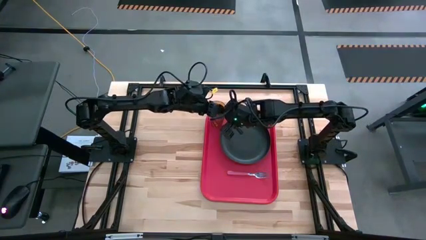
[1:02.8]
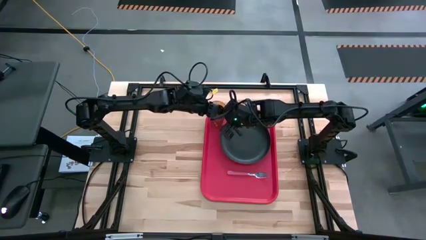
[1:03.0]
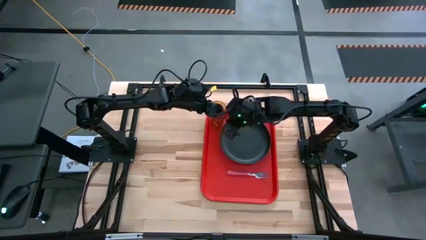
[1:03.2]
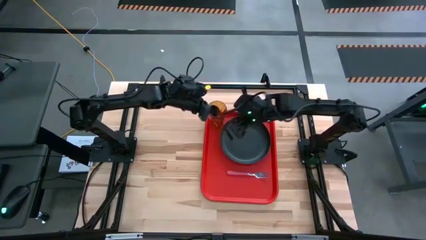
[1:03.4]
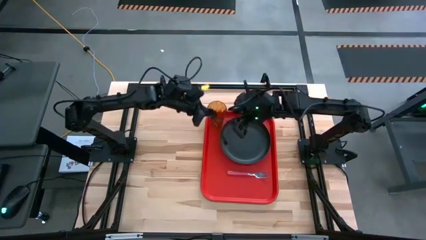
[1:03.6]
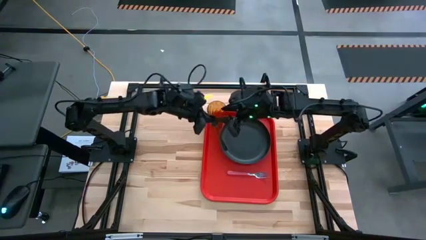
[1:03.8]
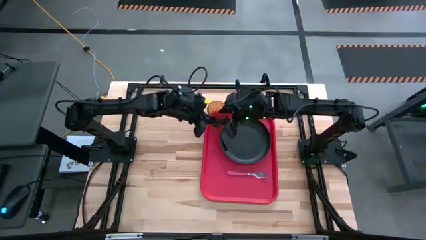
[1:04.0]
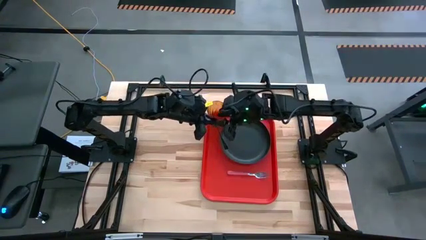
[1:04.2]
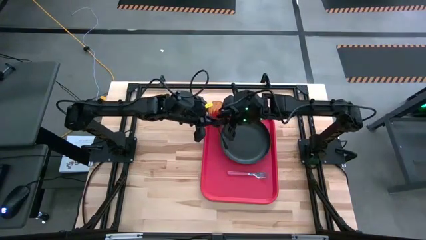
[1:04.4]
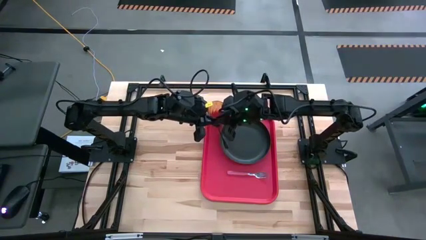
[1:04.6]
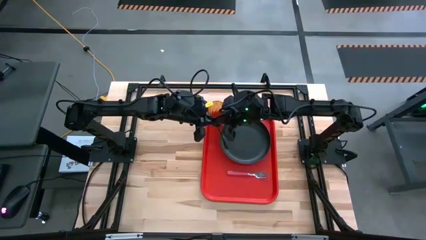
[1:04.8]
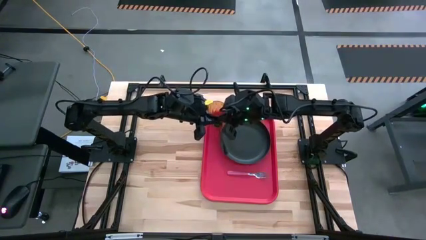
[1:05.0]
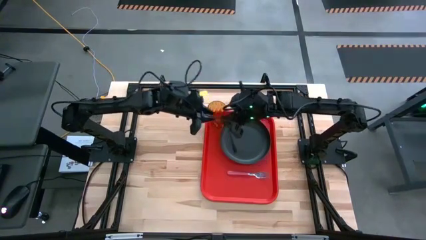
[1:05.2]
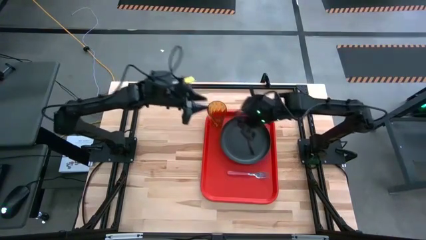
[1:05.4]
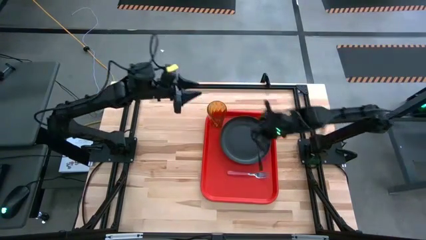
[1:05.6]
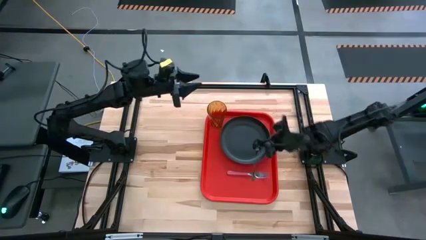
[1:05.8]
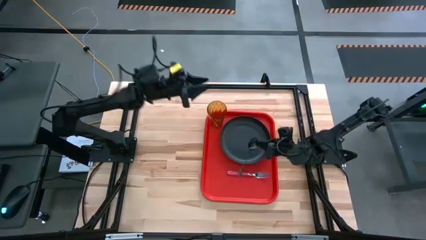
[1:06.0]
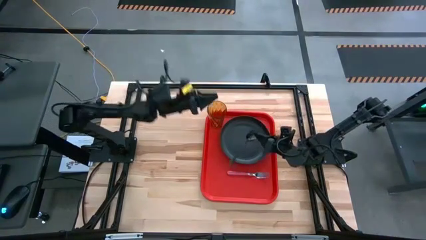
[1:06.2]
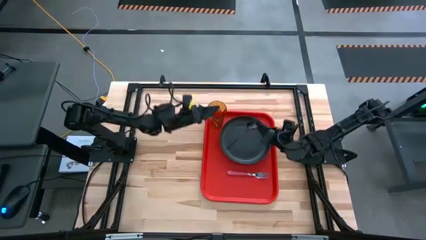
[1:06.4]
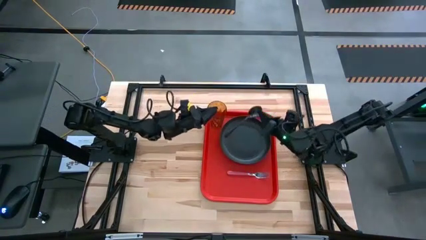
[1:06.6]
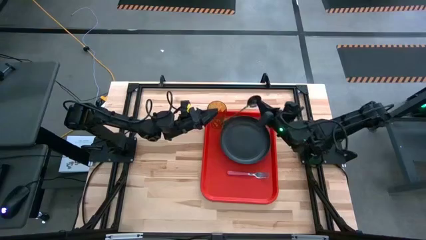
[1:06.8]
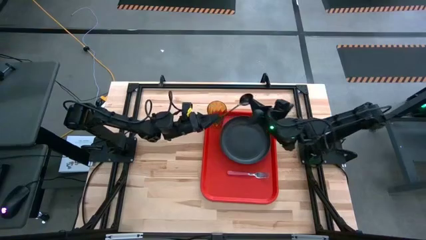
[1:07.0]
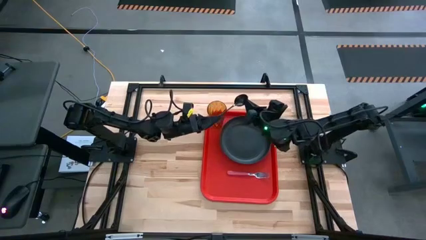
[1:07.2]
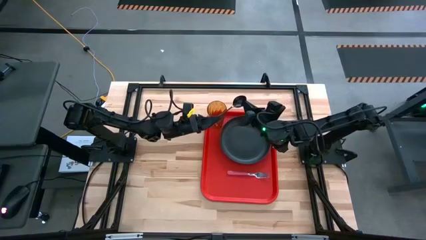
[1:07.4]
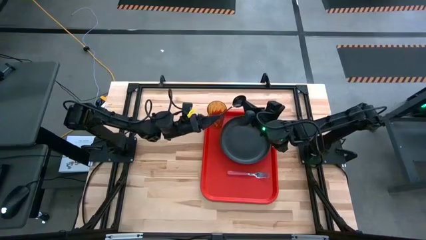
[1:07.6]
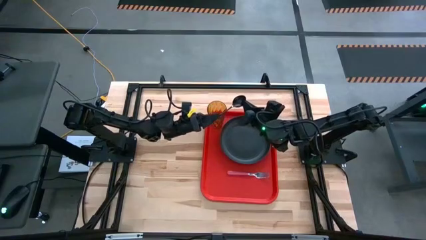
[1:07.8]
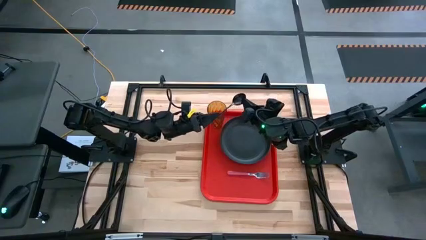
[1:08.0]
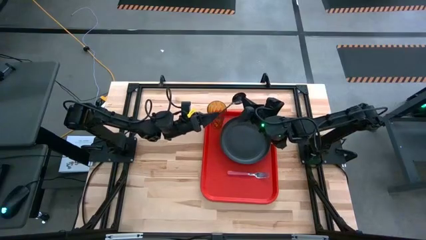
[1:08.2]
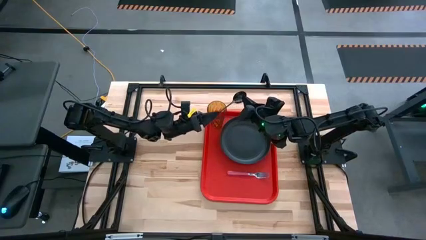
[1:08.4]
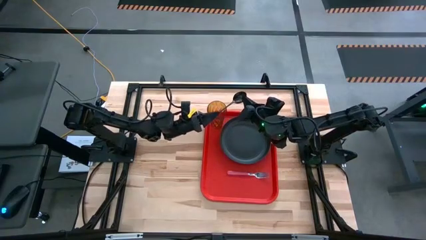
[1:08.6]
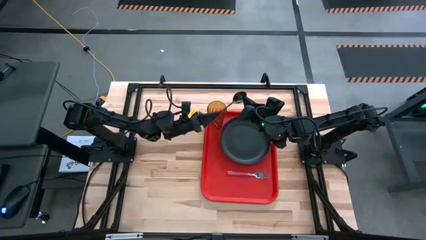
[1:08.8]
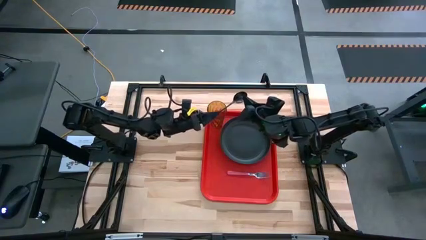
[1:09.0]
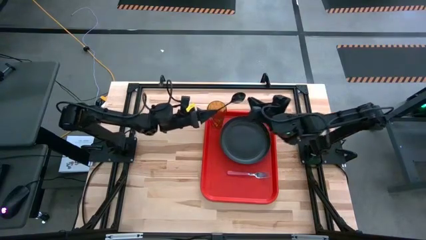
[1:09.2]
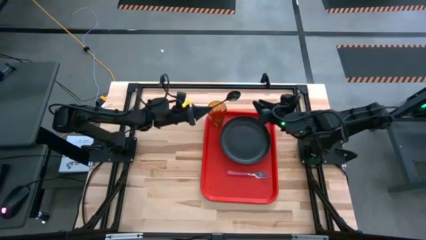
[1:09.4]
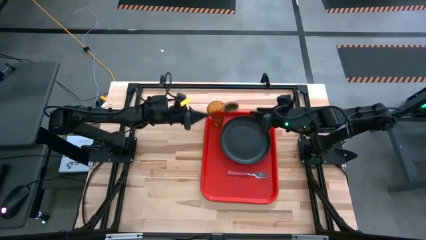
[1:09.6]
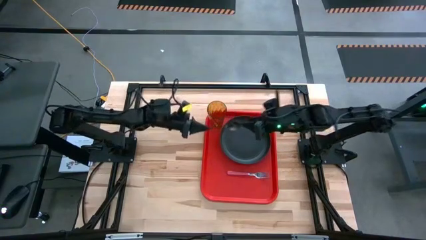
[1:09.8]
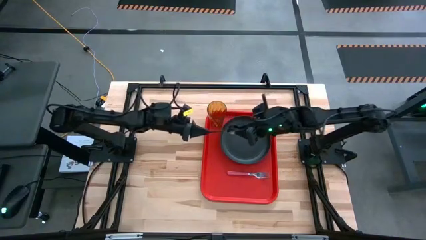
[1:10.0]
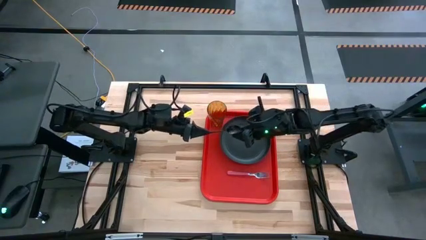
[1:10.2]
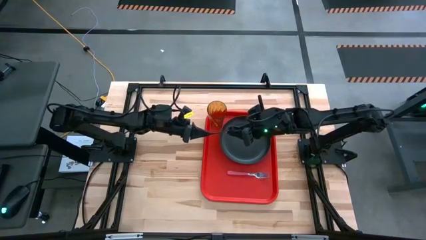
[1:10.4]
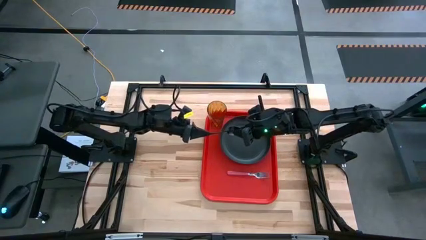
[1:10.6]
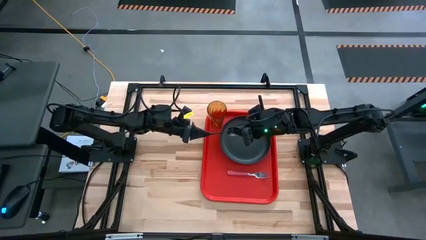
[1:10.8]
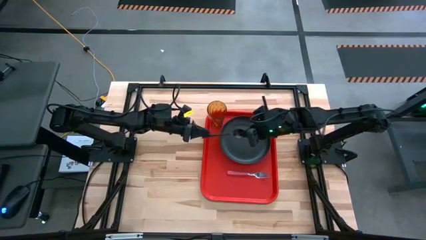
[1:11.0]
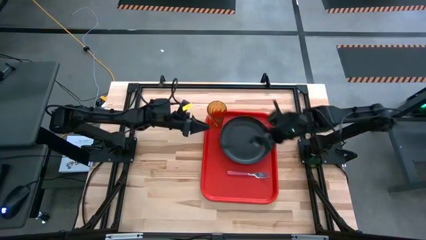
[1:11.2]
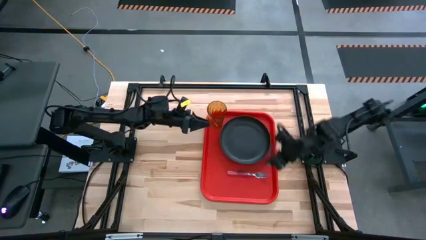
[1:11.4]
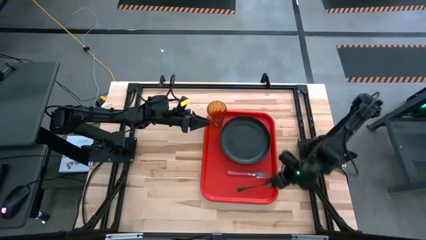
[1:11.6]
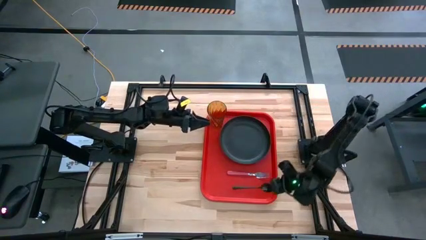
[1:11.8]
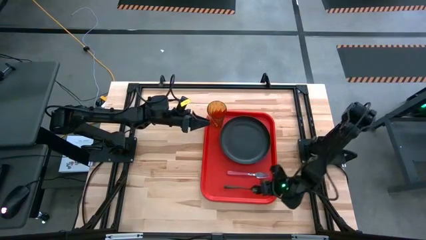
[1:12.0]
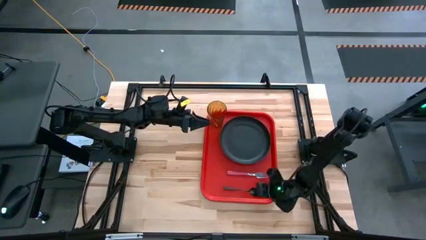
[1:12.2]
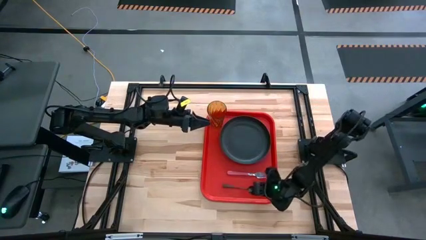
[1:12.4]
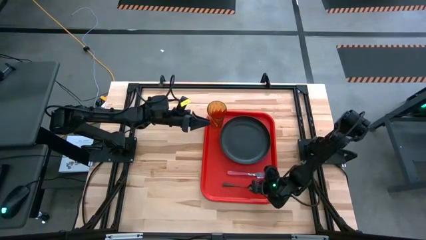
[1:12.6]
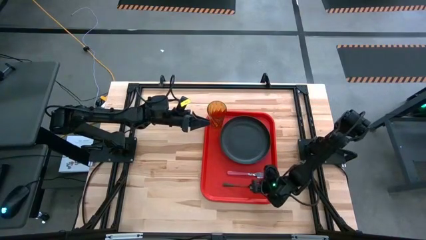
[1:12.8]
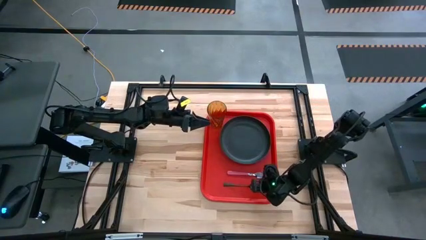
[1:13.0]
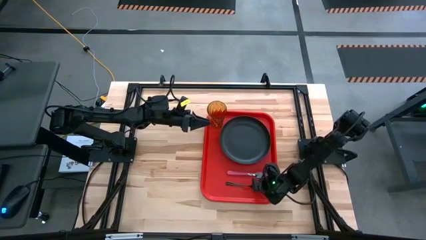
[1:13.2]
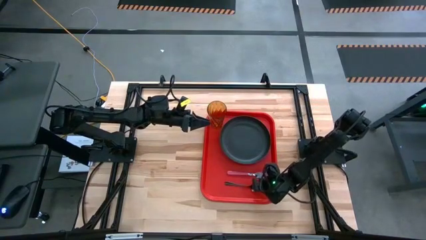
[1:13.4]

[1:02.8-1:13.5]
Task: Pick and place plate/cup/fork/spoon on tray
Put the black spoon on the red tray to the bottom of the pink fork

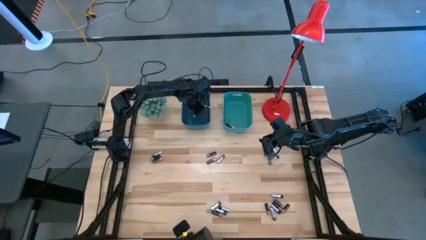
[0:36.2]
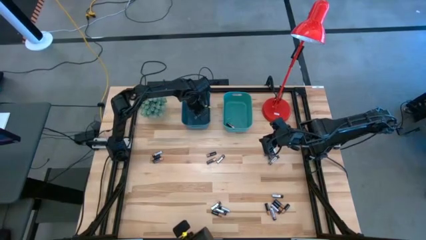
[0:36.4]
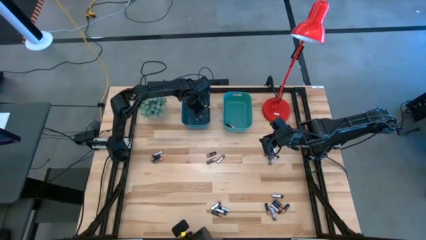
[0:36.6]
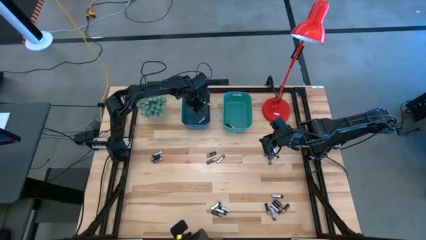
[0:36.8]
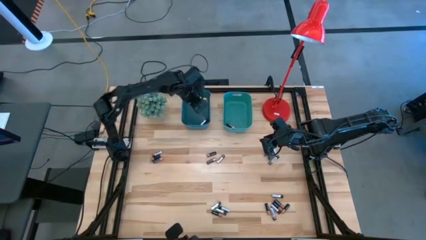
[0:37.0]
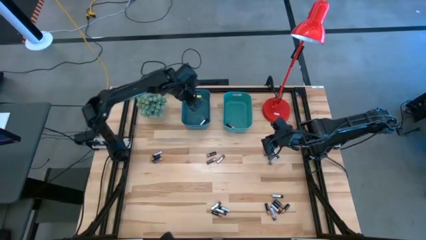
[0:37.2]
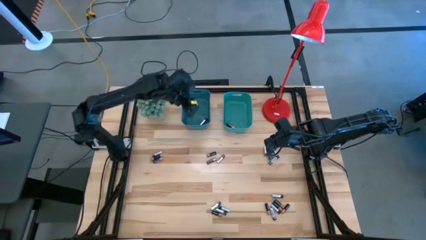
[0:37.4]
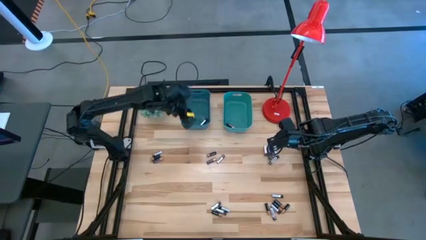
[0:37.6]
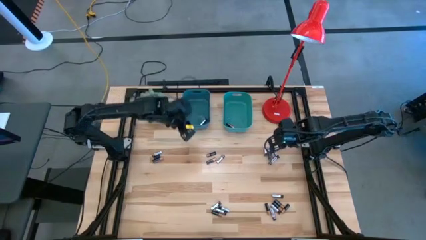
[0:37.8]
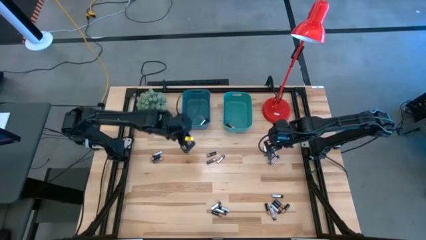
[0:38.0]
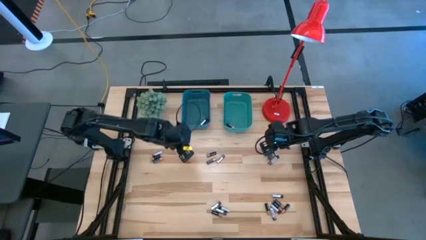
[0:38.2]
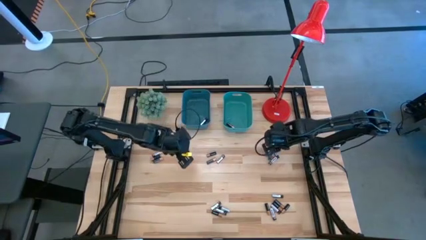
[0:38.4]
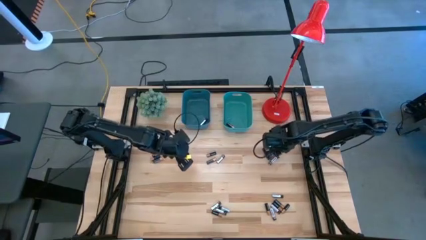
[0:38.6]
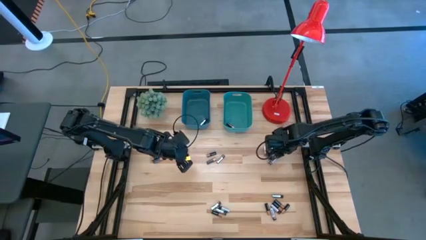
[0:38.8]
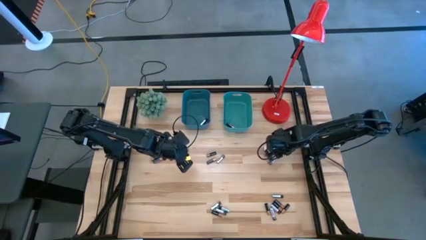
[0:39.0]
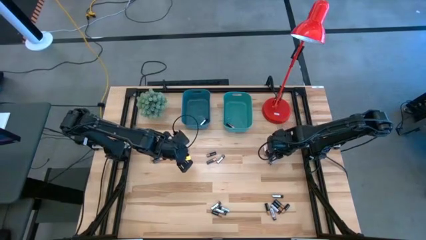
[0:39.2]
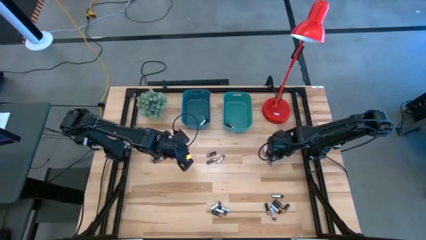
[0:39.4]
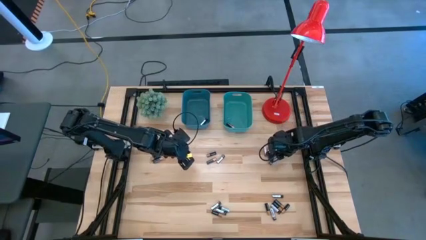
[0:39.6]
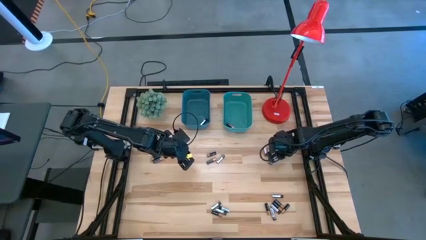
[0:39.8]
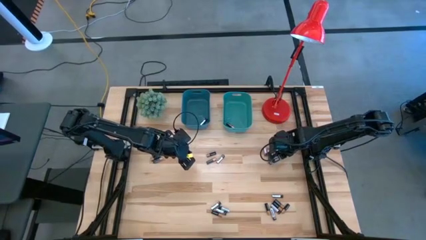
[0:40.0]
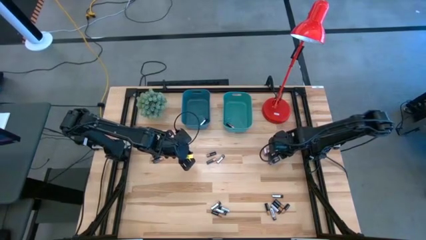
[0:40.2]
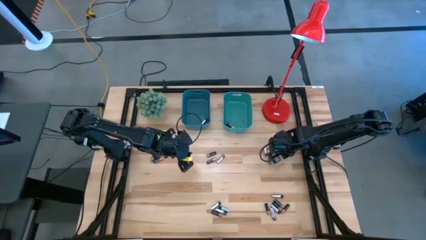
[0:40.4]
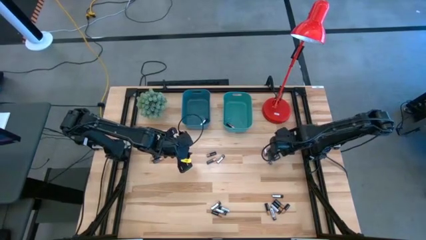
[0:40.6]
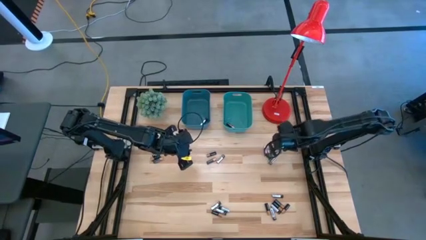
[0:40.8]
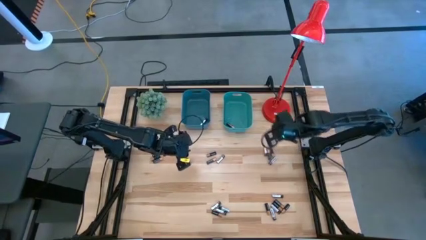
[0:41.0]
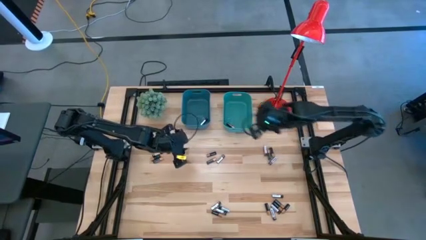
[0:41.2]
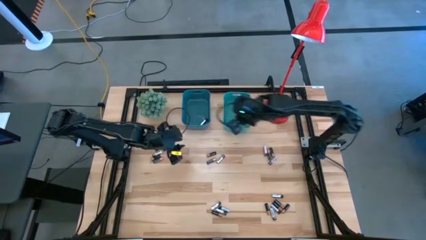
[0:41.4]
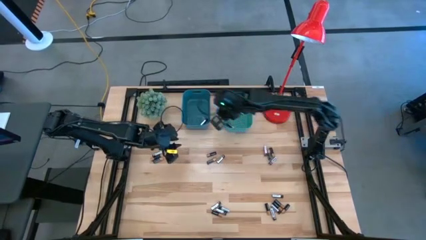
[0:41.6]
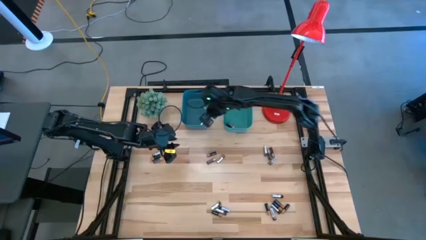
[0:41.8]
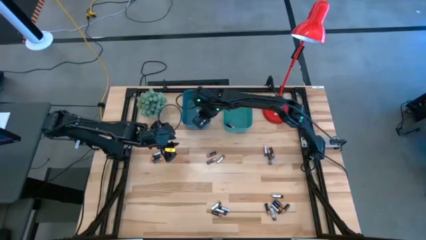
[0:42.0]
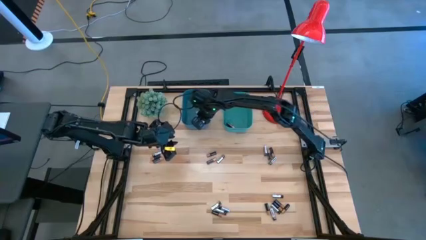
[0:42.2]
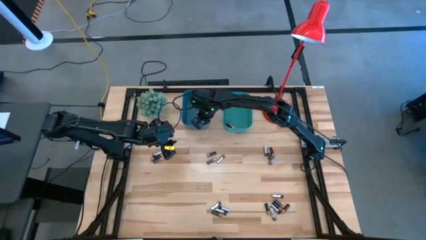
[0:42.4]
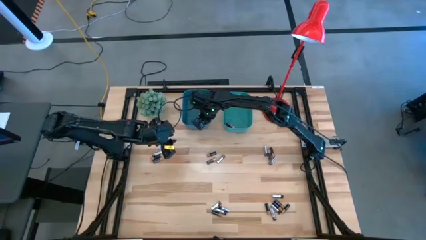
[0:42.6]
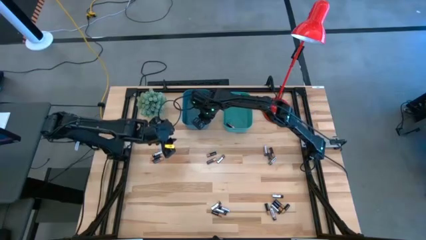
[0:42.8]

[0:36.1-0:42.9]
Task: Sort batteries
Put the silver battery into the blue bin
